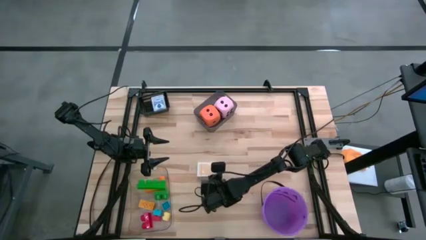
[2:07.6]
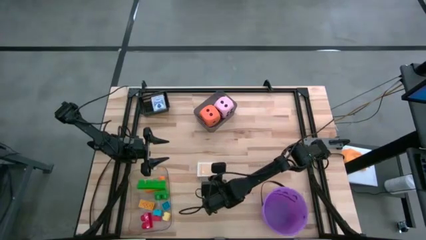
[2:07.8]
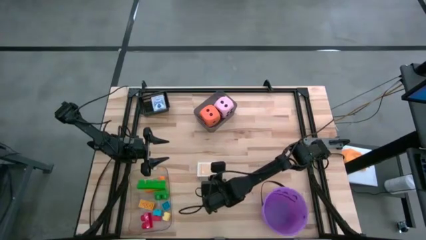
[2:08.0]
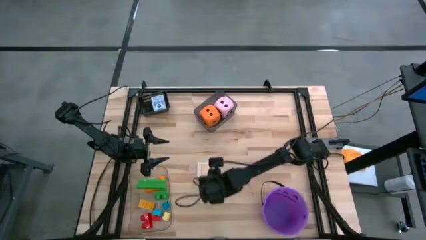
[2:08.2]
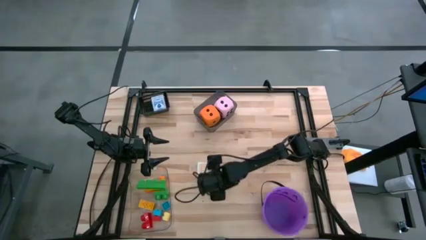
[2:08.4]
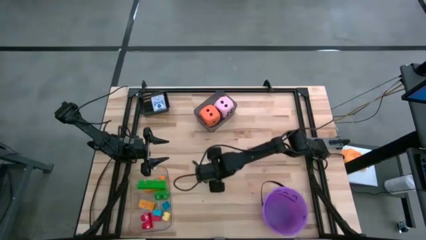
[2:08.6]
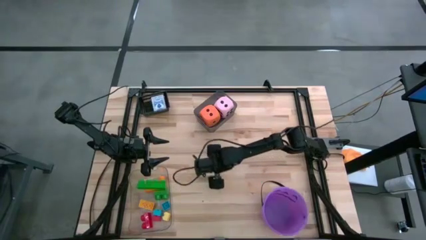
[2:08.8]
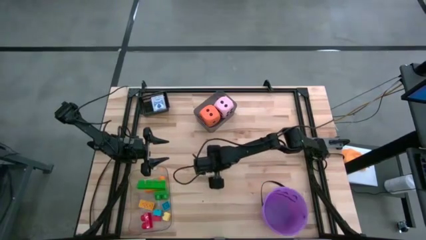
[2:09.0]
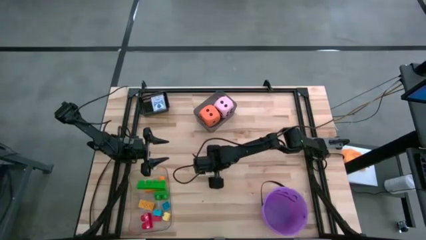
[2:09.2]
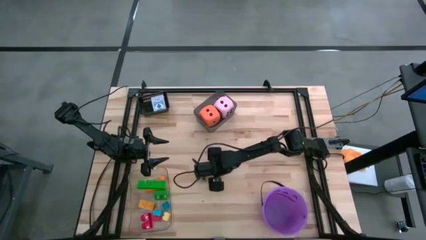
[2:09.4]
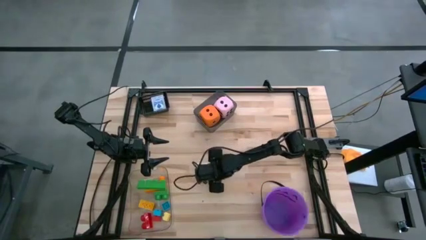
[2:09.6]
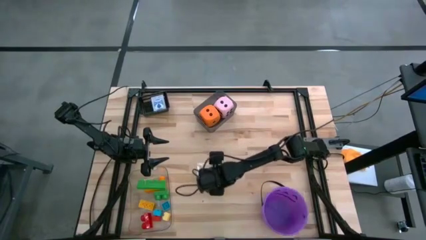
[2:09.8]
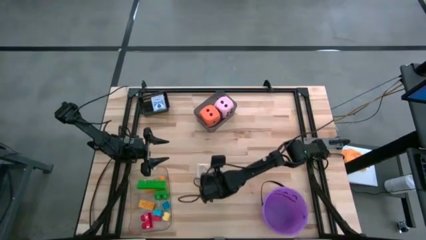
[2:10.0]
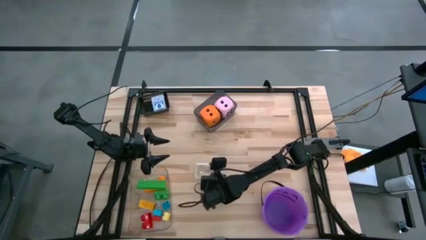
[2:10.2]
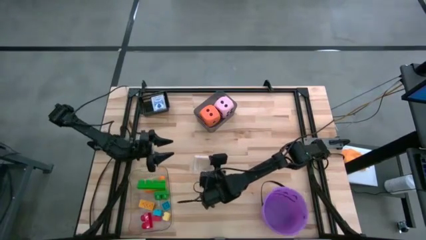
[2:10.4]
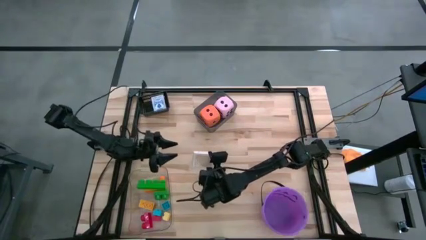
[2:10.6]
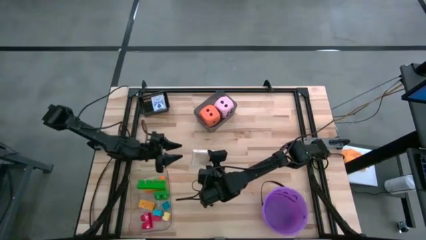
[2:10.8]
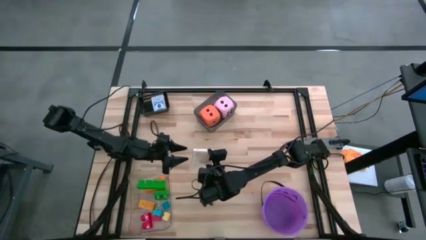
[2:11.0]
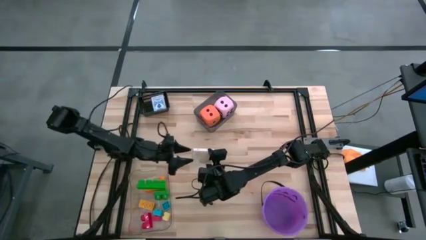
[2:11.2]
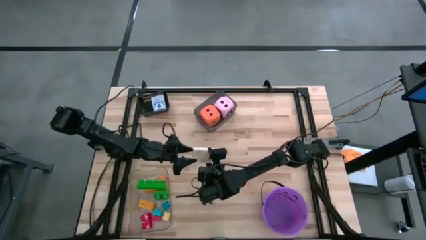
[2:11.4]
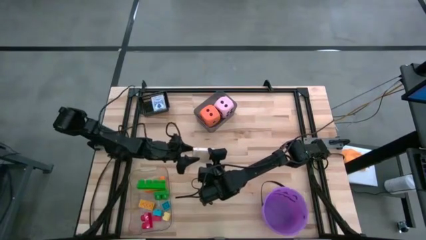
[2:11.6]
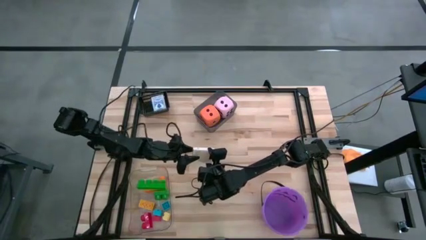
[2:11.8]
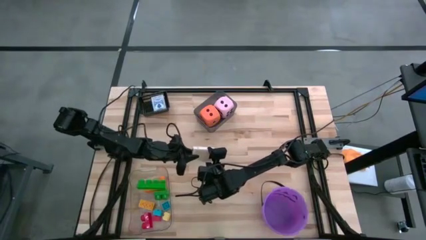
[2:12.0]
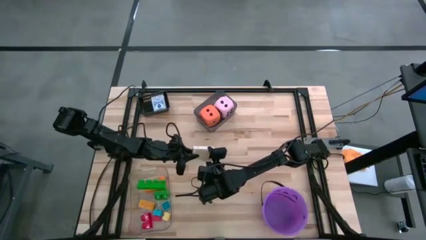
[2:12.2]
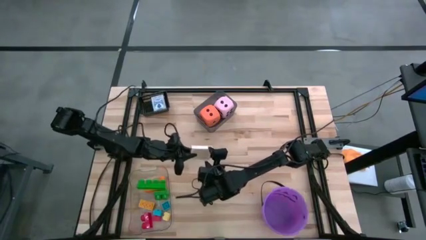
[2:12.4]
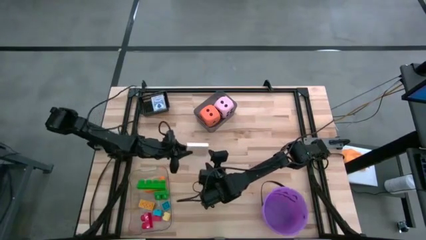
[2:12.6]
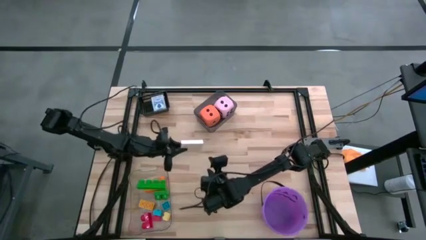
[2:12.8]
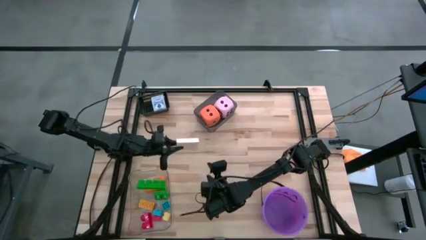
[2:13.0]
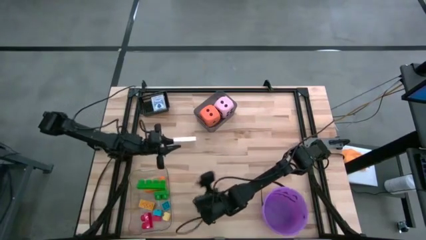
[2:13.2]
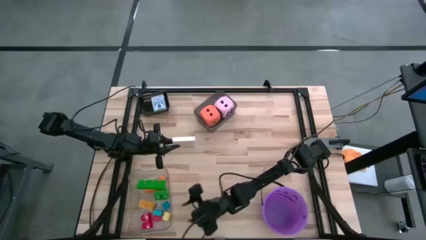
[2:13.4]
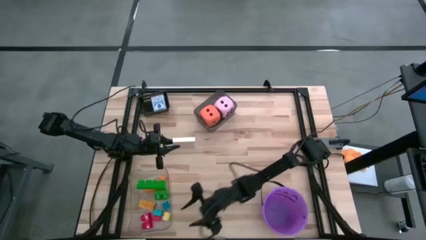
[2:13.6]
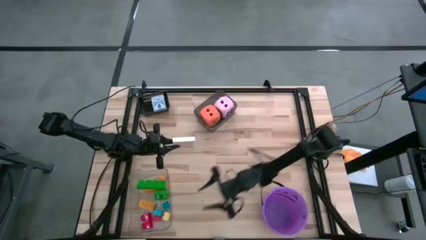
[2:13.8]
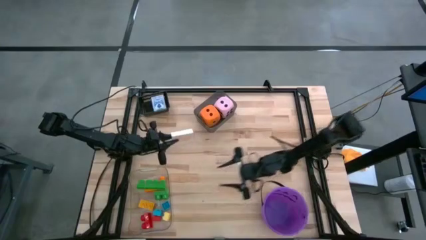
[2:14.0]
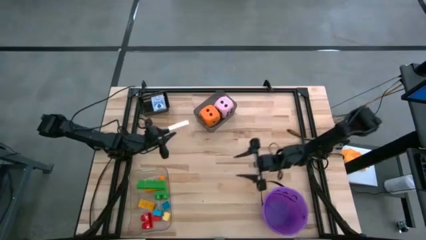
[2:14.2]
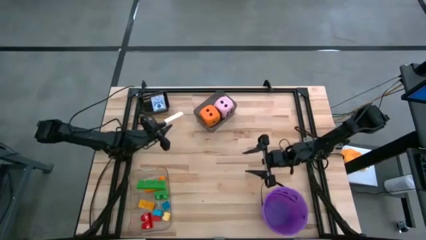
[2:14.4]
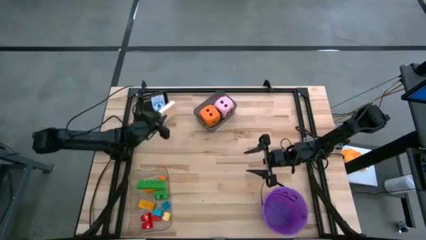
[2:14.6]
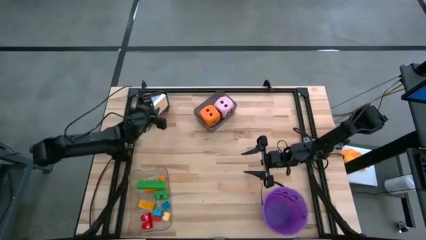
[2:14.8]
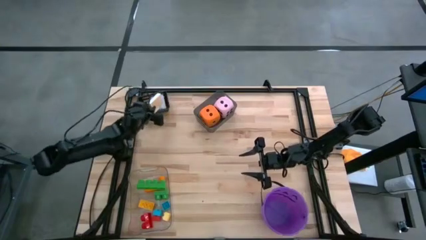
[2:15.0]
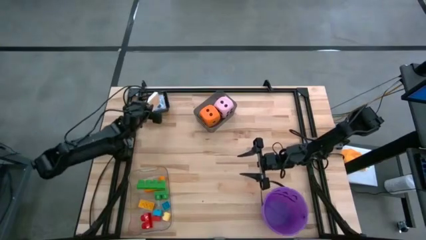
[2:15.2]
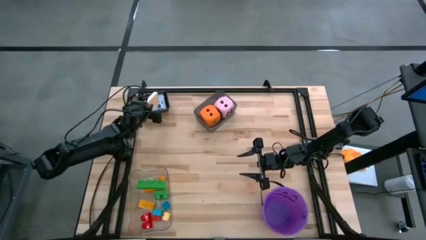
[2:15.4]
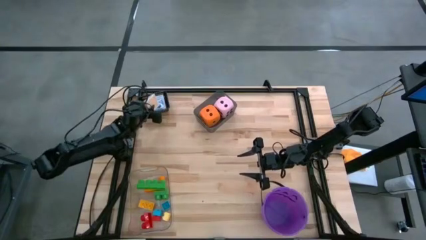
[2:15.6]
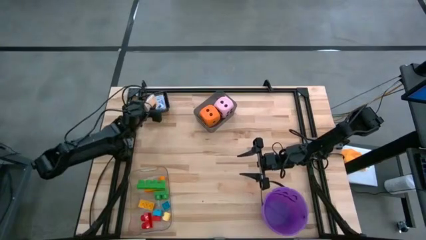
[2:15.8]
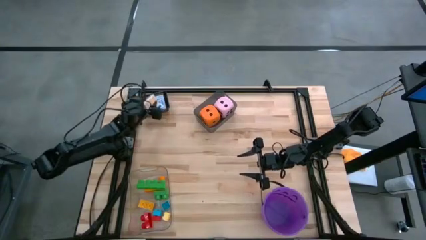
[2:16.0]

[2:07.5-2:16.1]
Task: Pick & Place Toys
Put the yellow deck of cards into the black bin

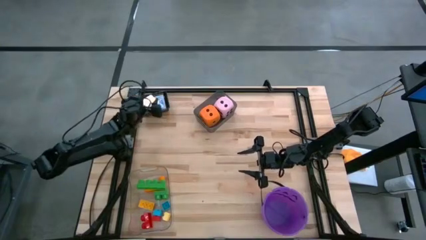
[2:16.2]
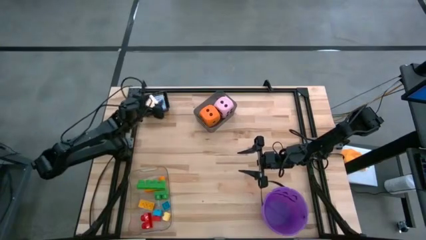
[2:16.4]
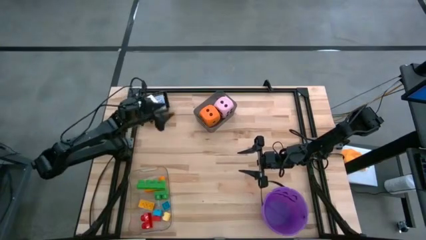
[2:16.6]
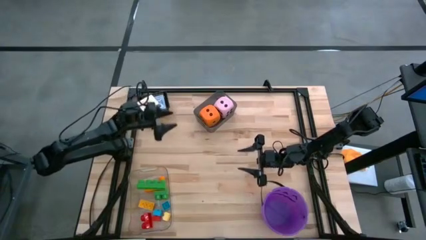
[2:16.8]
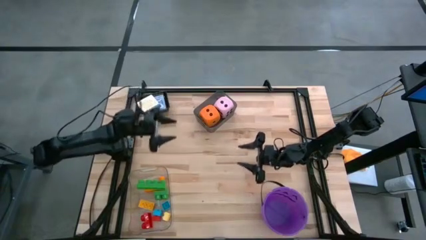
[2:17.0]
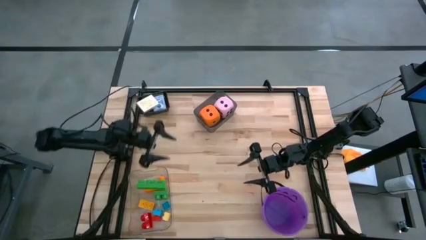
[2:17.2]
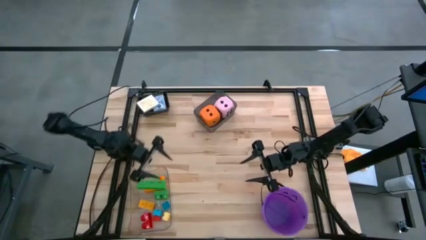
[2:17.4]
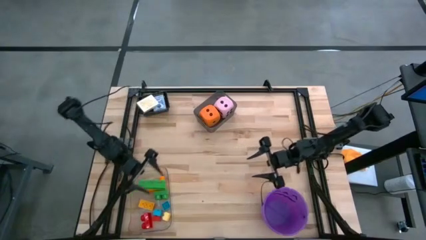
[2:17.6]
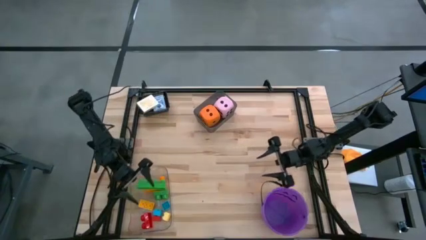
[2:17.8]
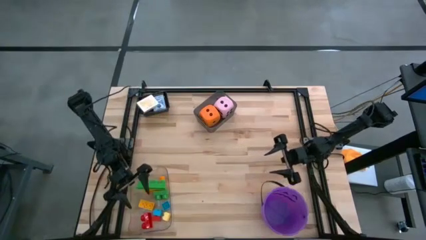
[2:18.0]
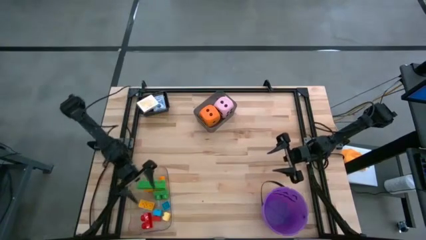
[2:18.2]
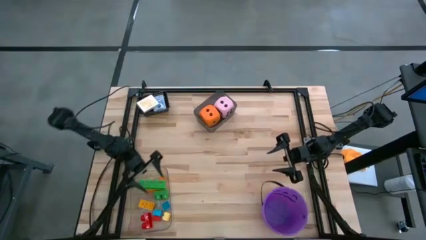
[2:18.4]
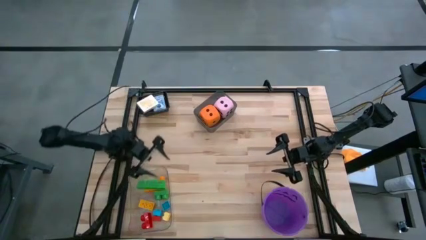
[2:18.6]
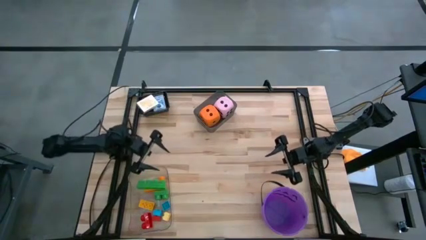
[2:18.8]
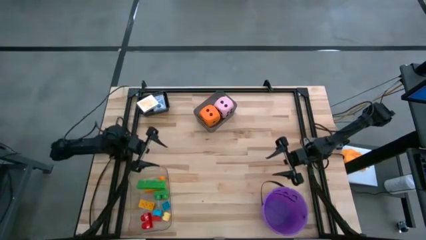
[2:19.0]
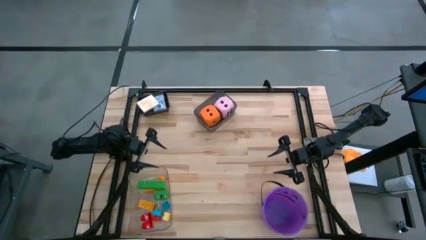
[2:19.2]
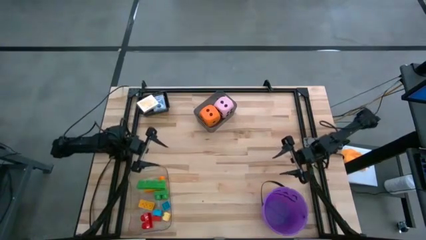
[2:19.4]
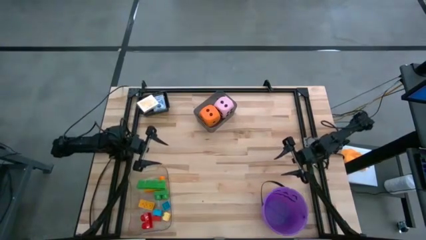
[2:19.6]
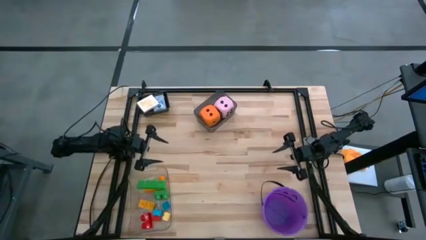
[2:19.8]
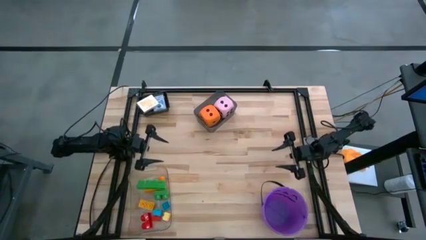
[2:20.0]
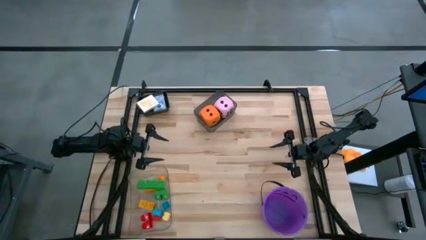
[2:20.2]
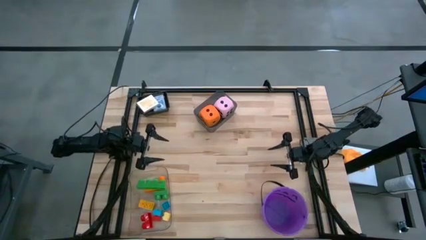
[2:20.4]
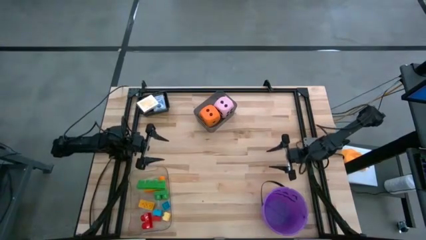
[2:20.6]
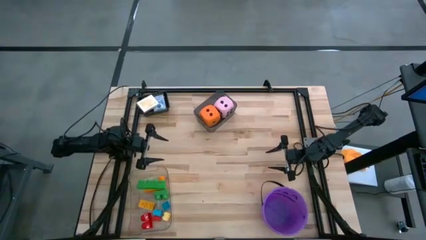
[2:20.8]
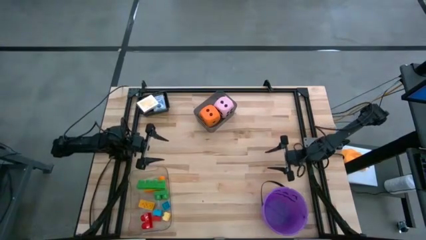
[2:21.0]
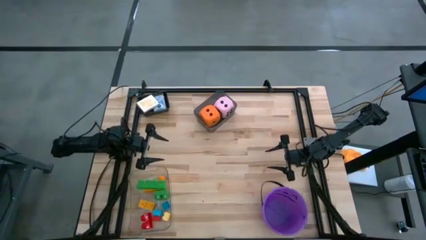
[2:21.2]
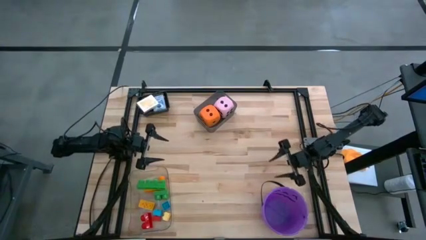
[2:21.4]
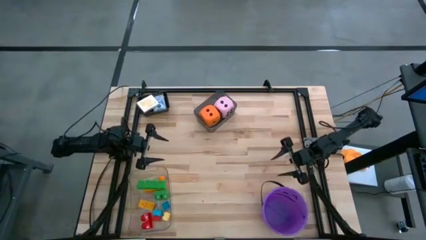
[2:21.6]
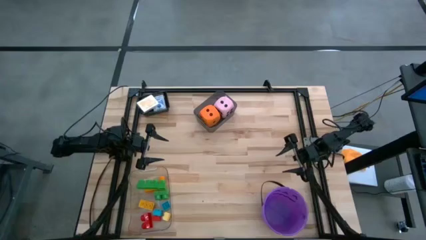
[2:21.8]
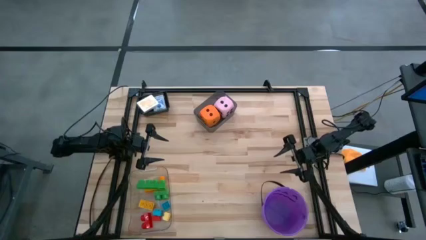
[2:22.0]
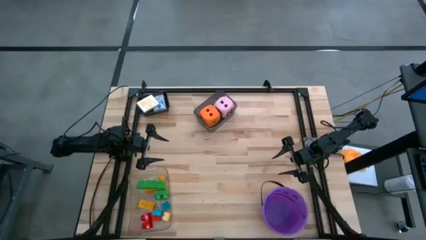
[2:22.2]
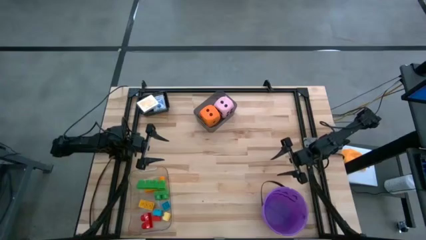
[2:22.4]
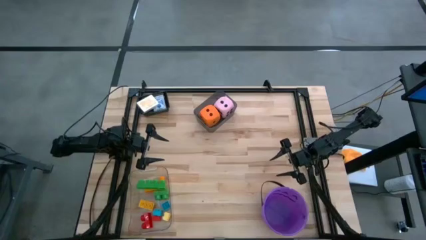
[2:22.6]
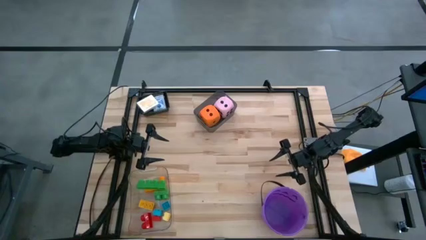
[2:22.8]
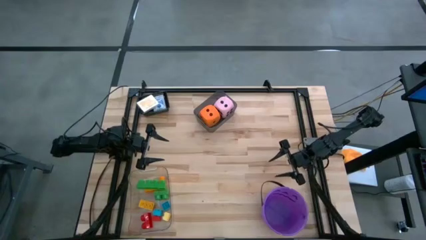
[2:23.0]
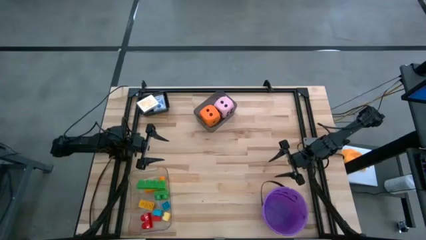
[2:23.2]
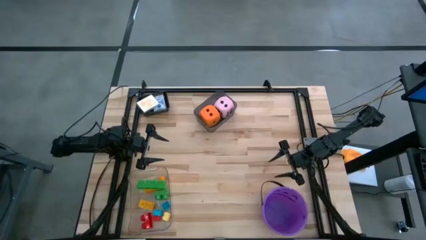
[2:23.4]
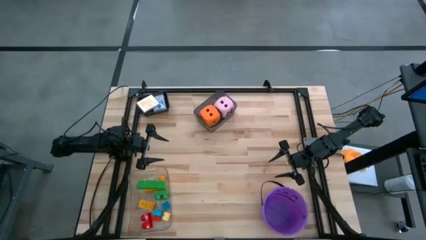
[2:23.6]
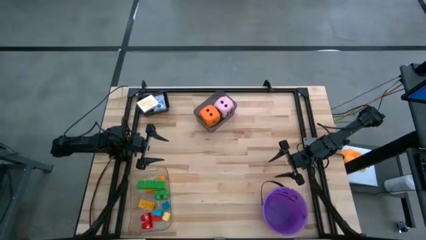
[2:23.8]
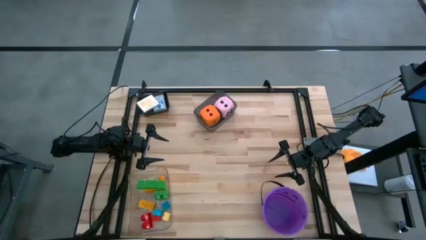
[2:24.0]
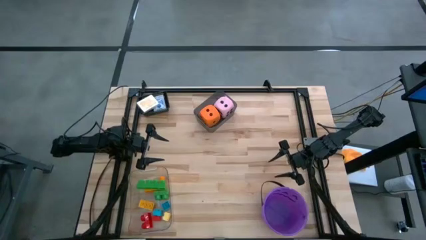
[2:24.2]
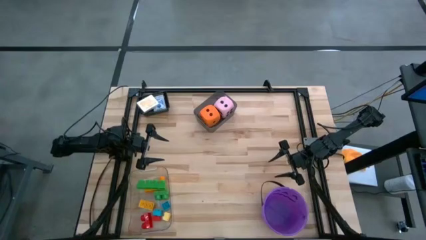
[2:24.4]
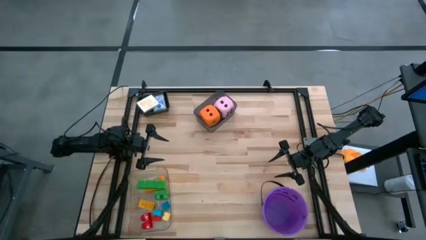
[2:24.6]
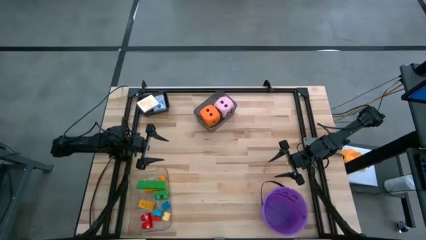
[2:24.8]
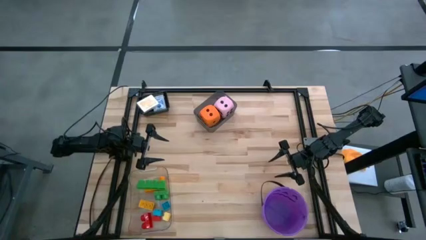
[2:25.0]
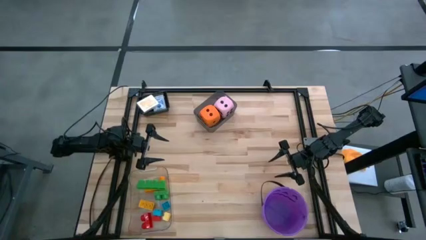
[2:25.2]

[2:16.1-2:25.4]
Return to Home Position
